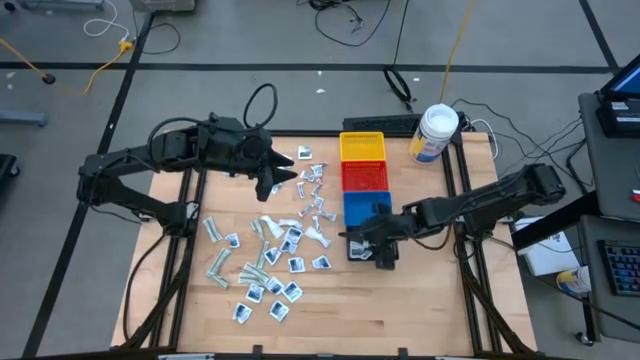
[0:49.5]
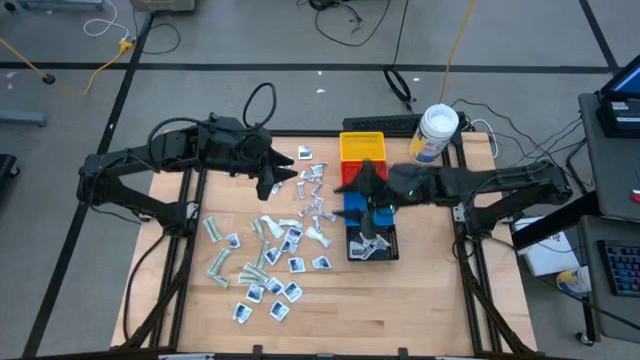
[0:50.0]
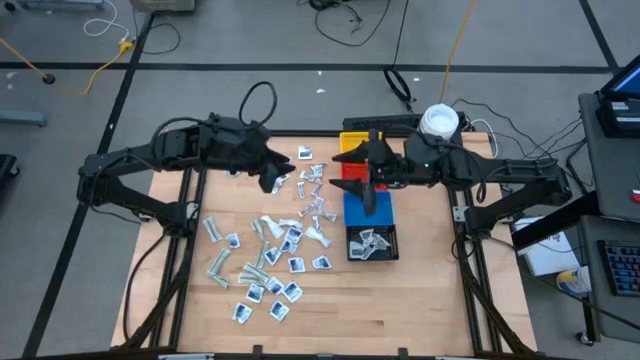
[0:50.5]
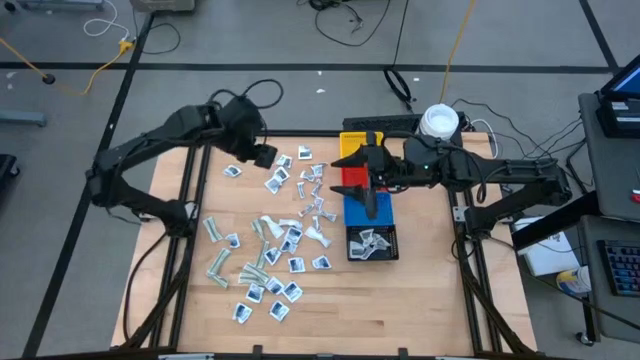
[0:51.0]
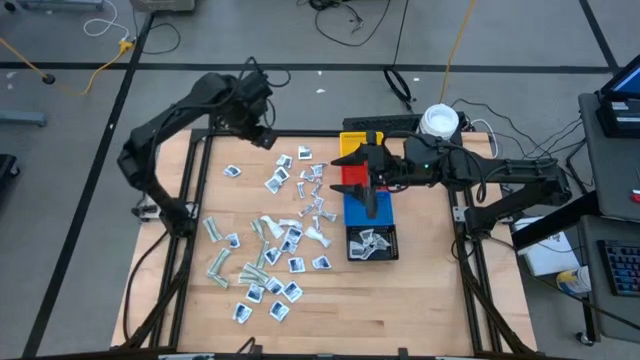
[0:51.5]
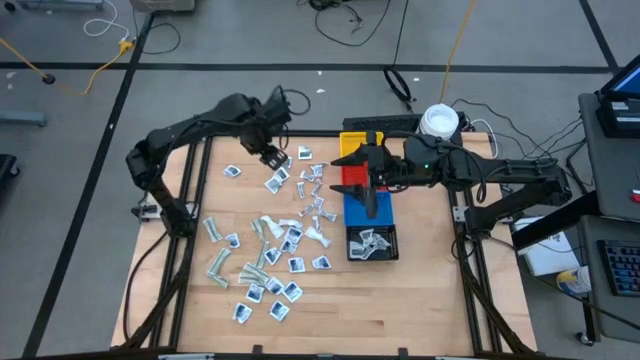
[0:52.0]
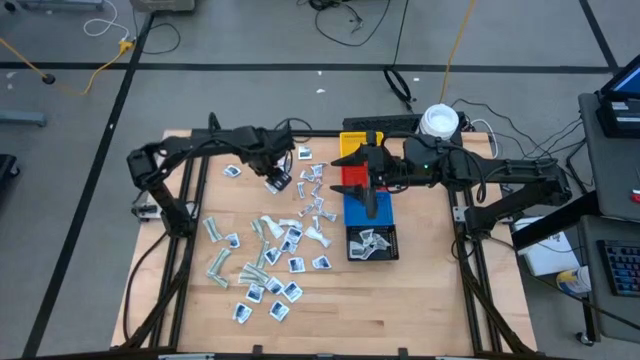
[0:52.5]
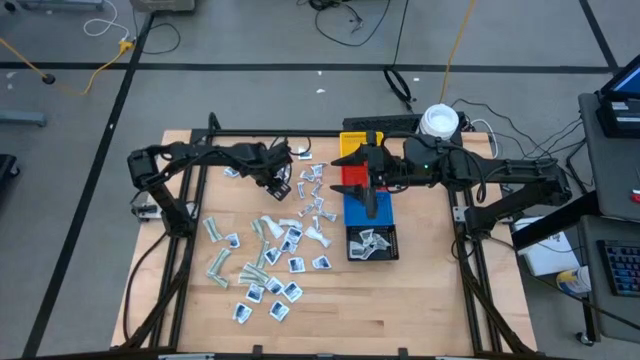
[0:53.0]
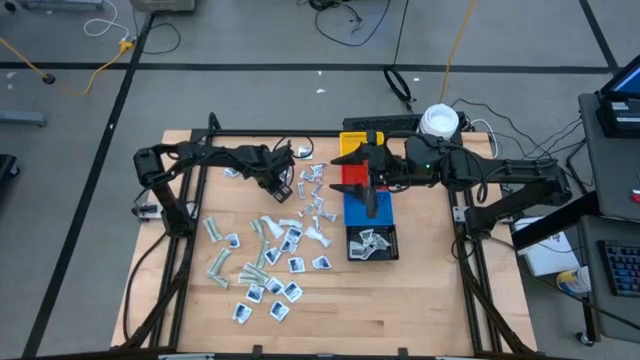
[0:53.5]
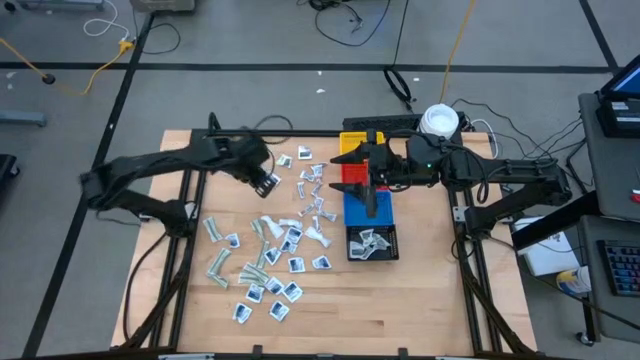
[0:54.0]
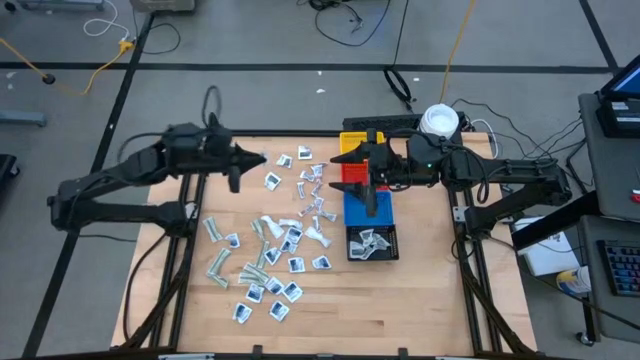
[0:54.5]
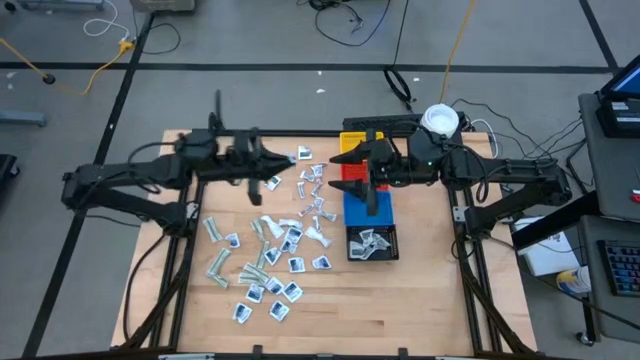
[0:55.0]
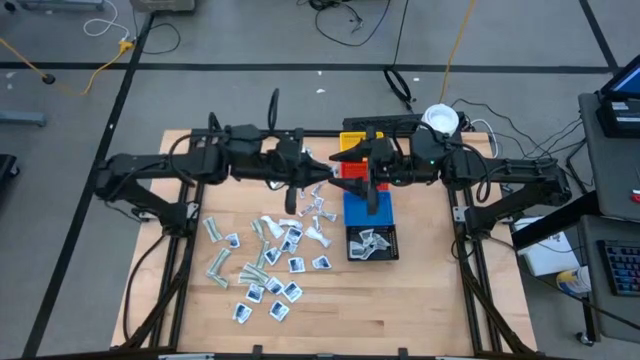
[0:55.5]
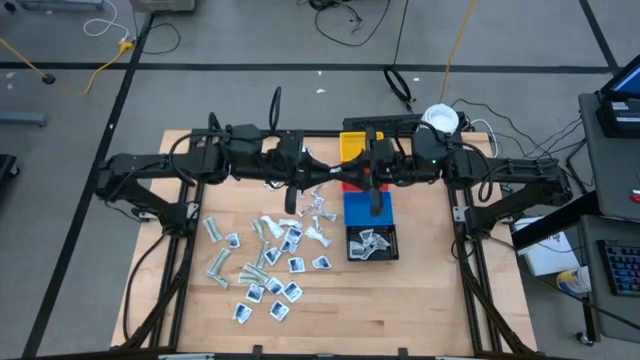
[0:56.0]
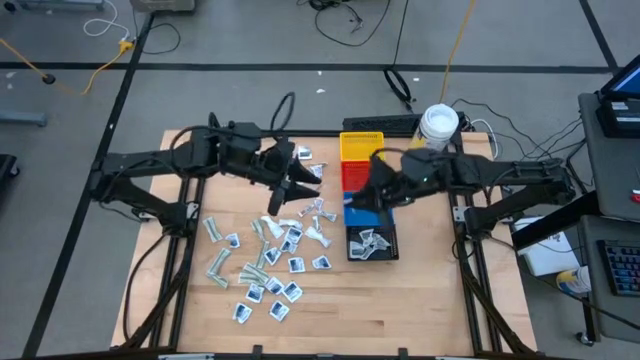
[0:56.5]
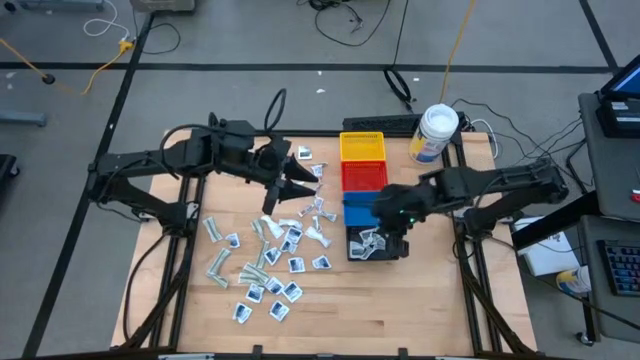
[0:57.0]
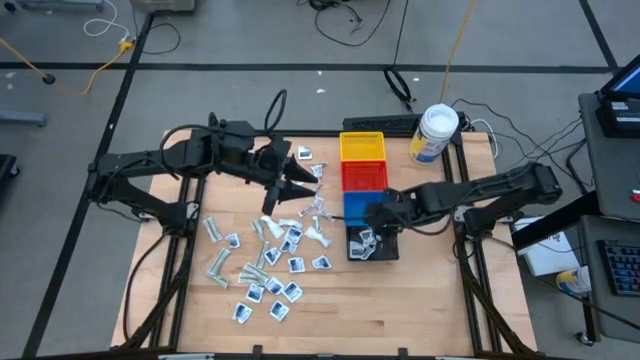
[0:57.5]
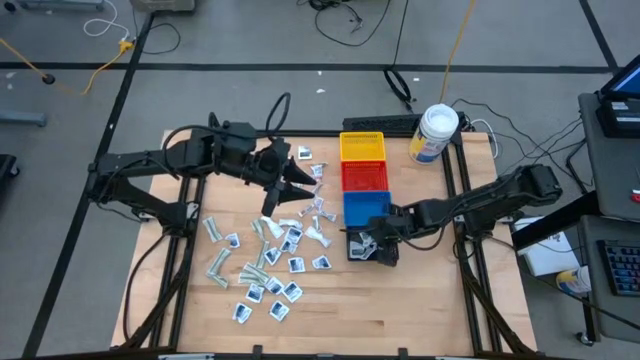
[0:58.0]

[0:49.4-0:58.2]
Task: Pick & Place First Aid Supplies
Put the black towelette pack into the black bin

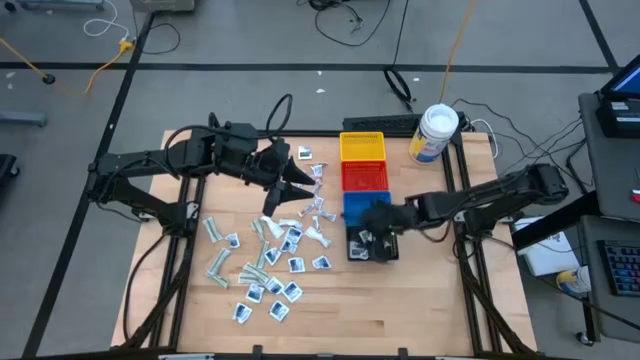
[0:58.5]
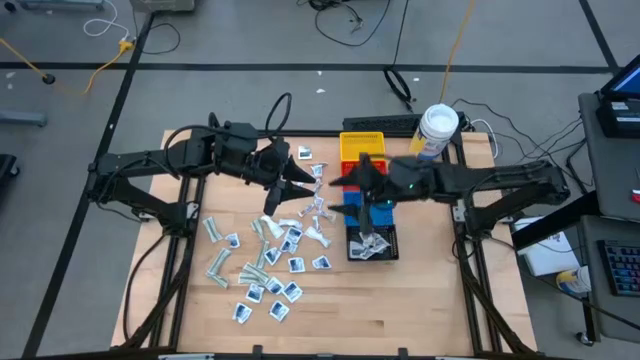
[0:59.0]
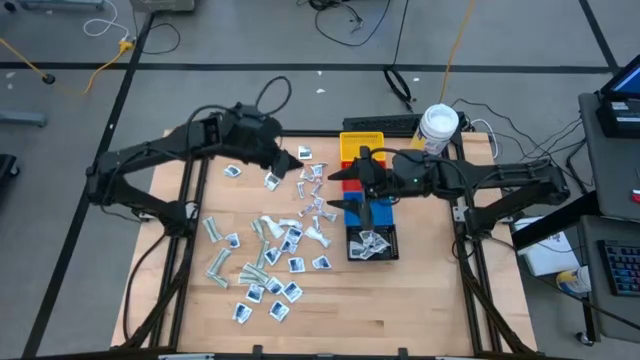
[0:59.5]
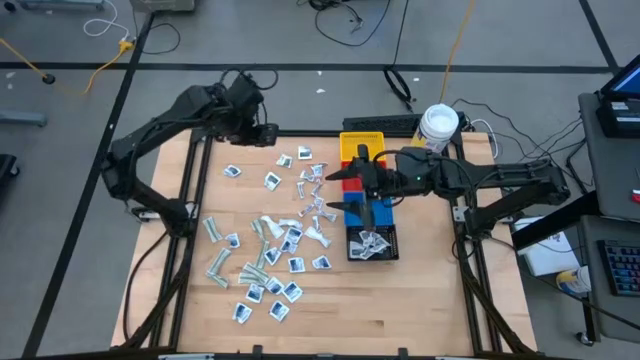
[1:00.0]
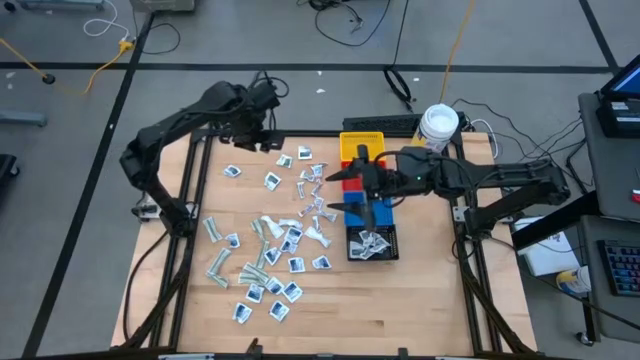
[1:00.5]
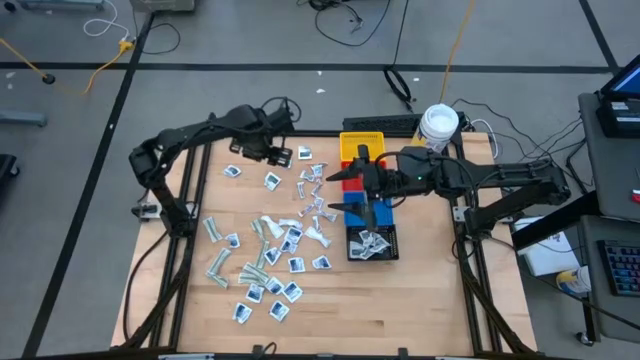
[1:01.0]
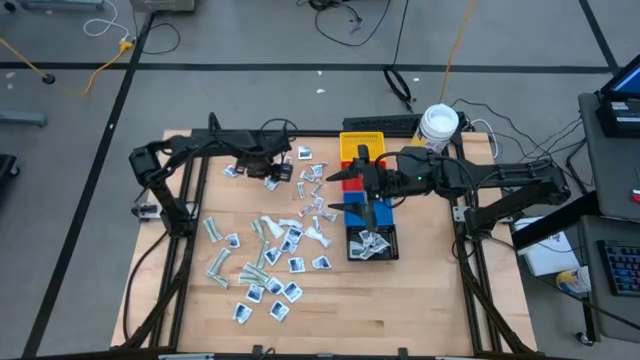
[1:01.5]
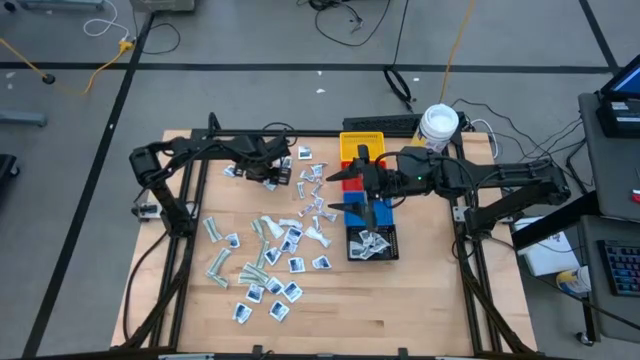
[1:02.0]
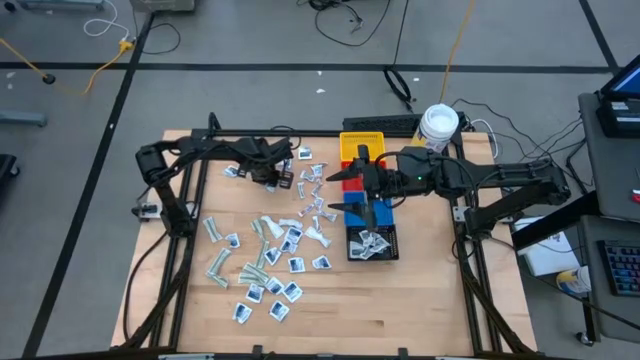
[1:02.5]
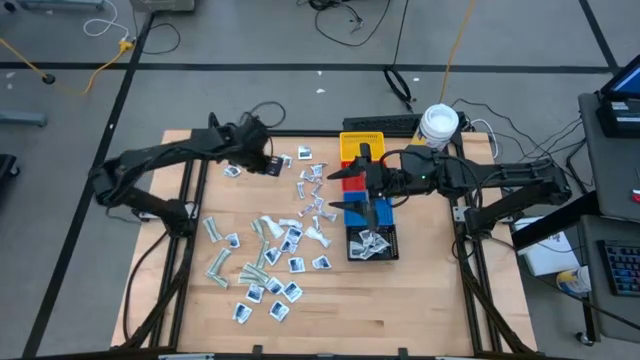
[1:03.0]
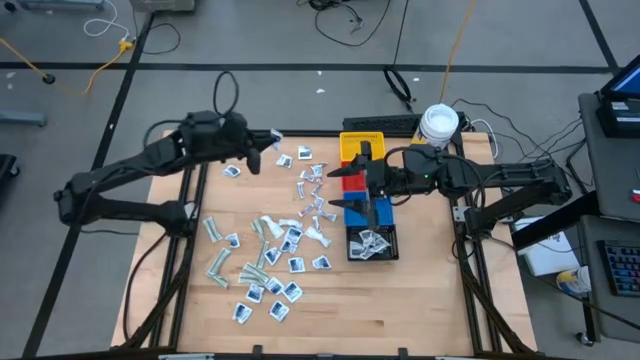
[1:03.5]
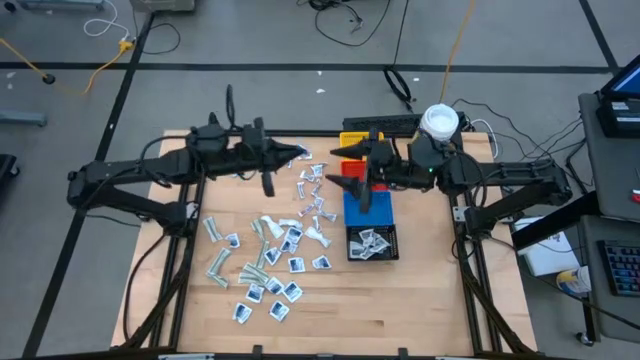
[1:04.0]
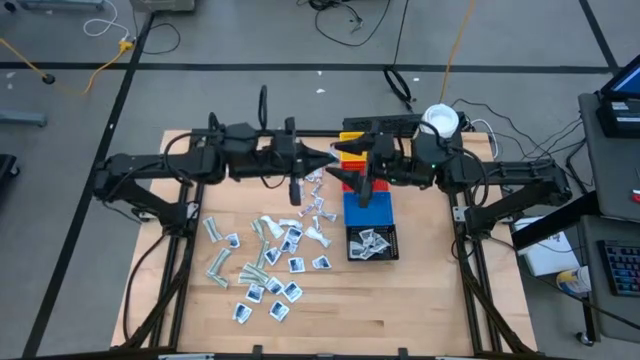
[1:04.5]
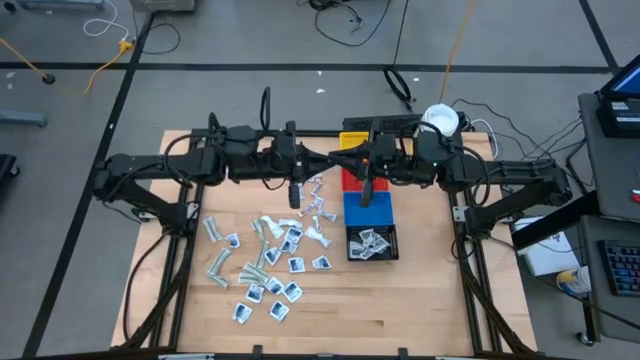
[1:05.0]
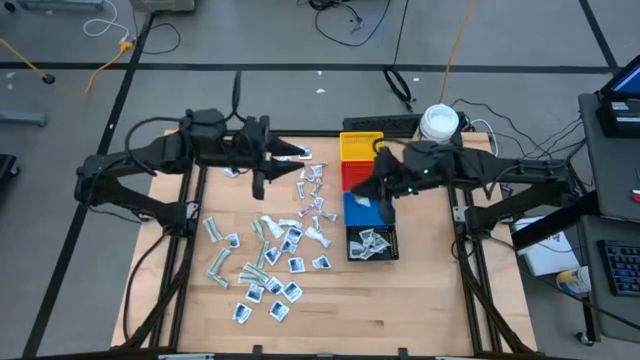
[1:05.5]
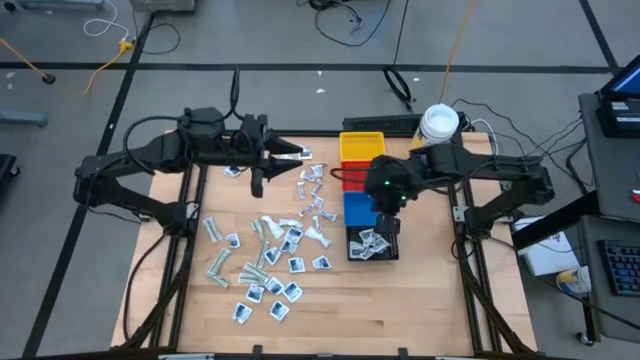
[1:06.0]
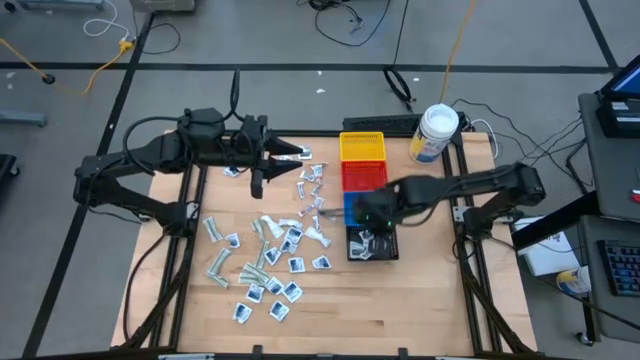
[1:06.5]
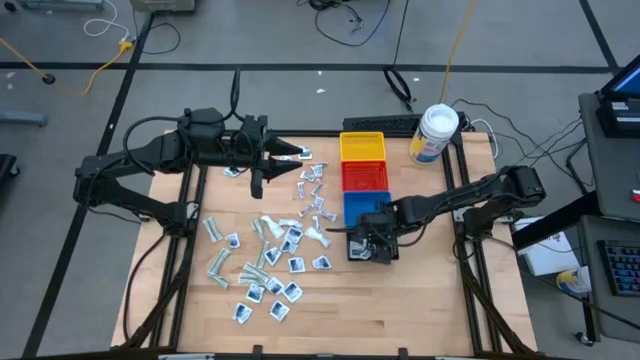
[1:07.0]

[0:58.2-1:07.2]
Put the black towelette pack into the black bin

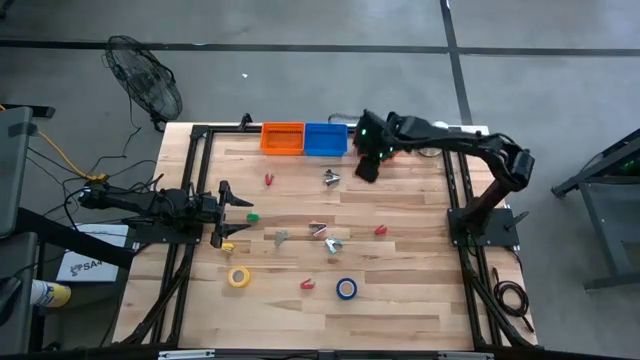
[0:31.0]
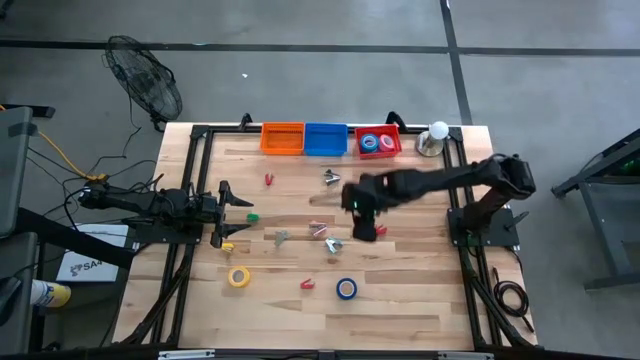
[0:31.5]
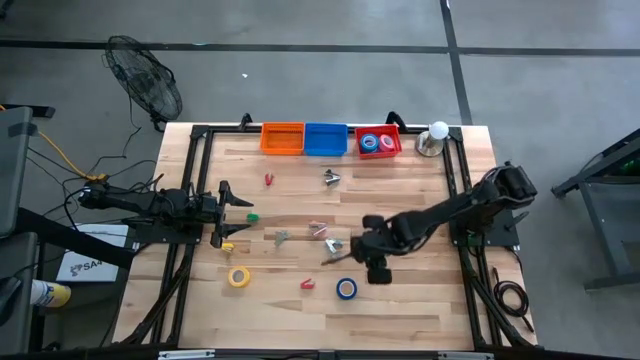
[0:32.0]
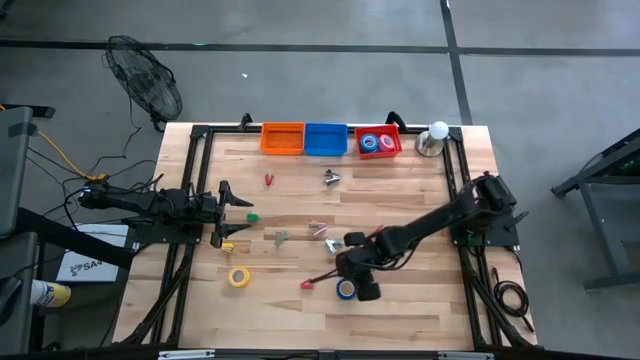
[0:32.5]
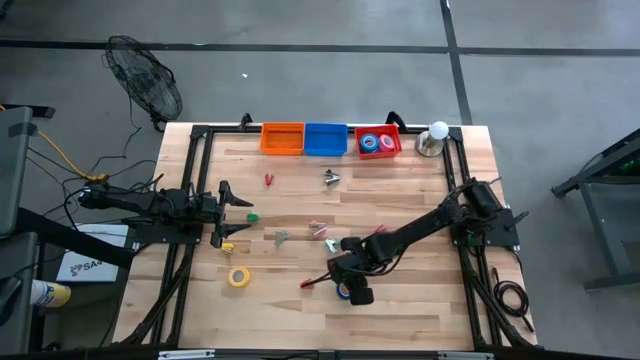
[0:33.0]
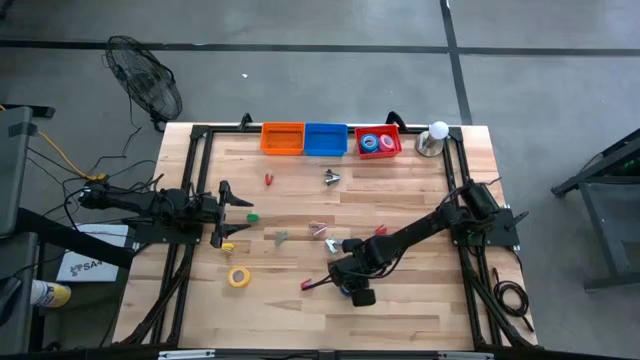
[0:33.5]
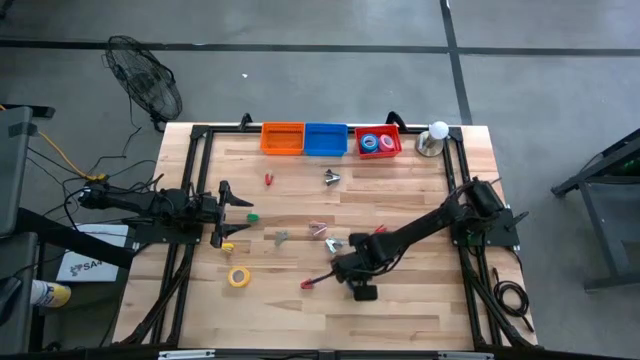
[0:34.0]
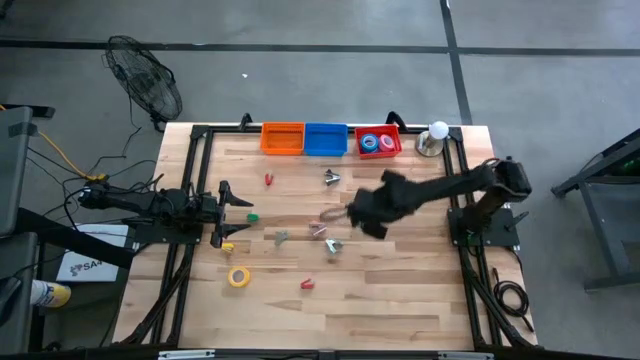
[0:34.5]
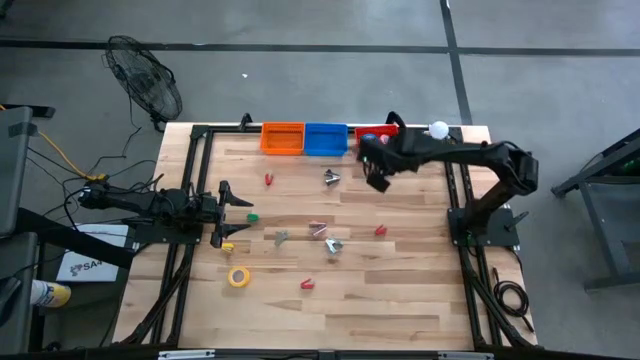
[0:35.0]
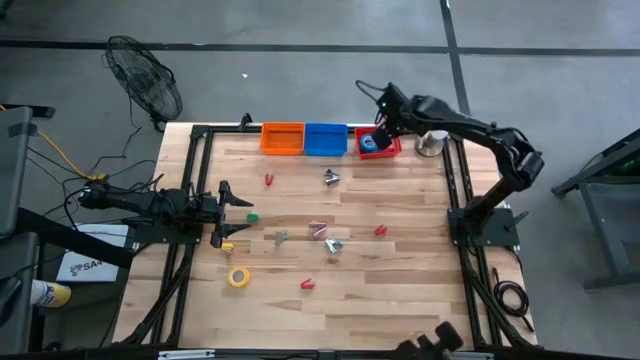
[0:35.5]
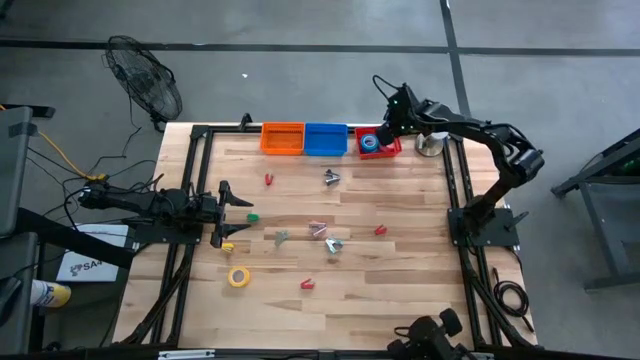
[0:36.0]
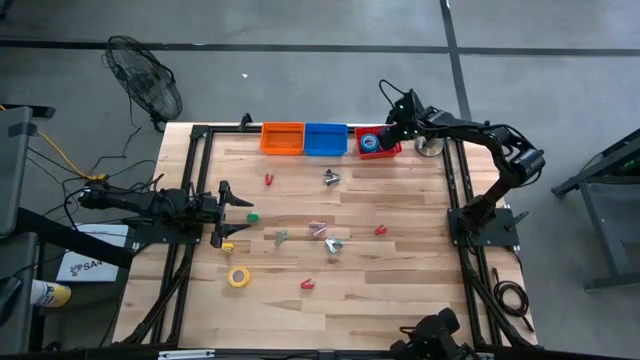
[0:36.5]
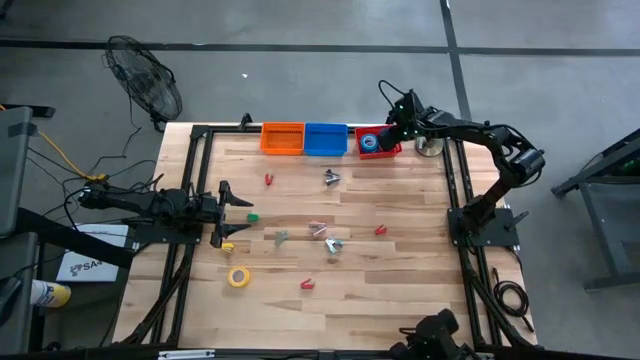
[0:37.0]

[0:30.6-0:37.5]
Task: Pick and place Stapler, Stapler remover, tape
Put the dark blue tape into the red bin
